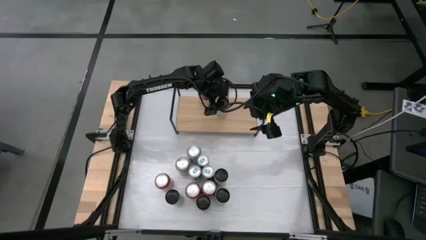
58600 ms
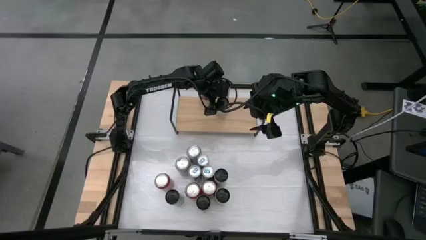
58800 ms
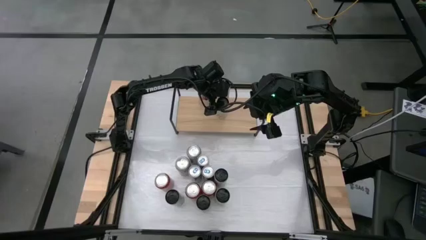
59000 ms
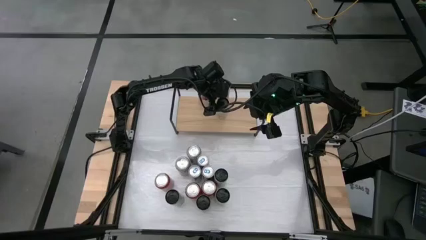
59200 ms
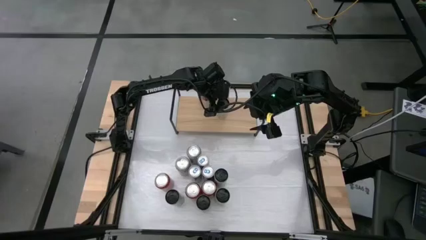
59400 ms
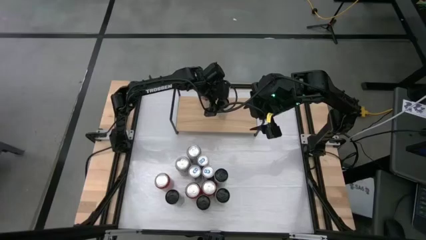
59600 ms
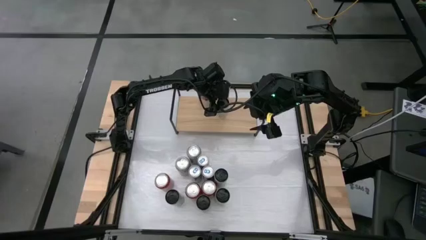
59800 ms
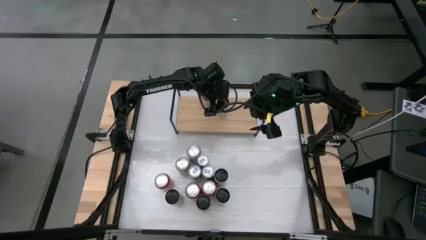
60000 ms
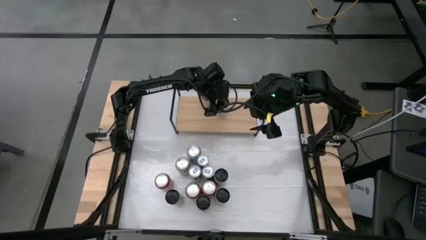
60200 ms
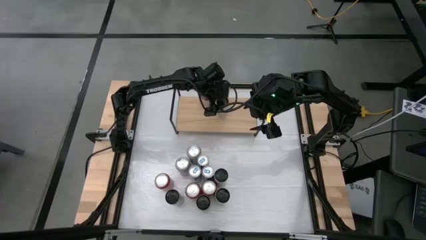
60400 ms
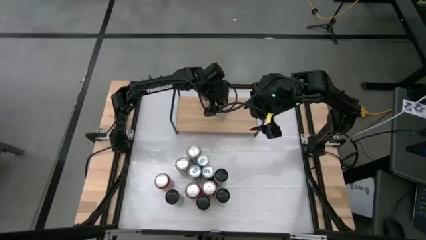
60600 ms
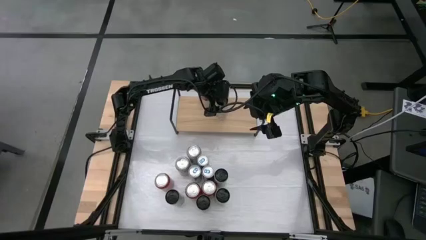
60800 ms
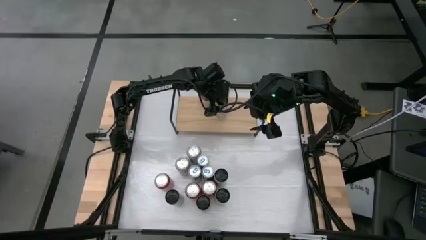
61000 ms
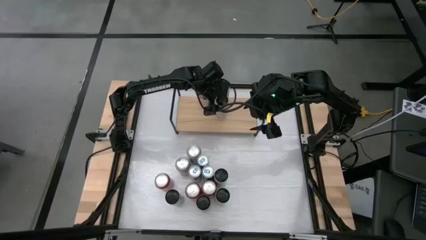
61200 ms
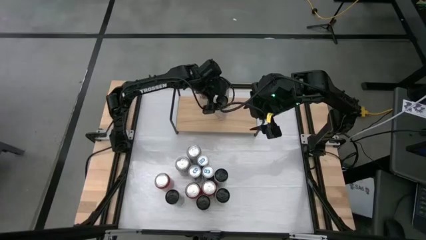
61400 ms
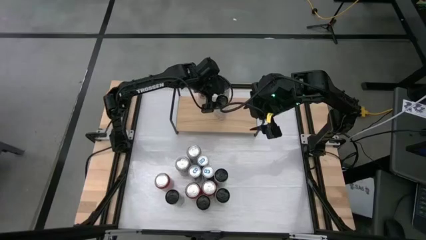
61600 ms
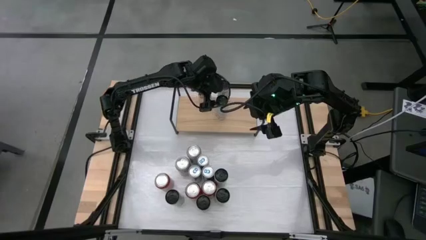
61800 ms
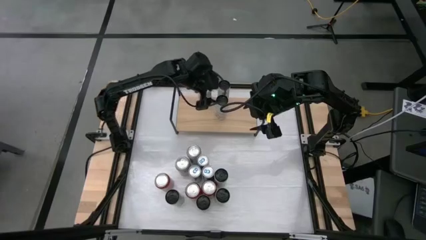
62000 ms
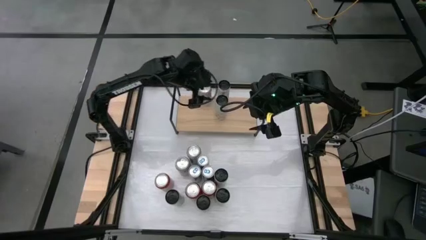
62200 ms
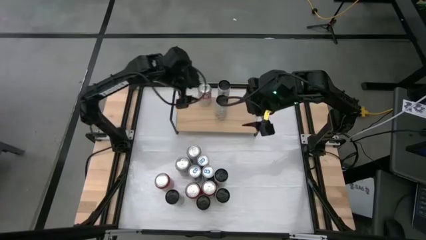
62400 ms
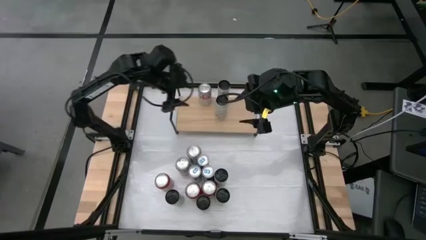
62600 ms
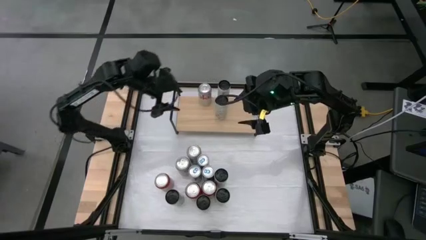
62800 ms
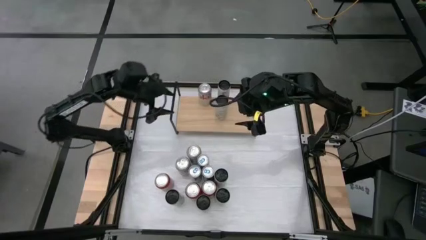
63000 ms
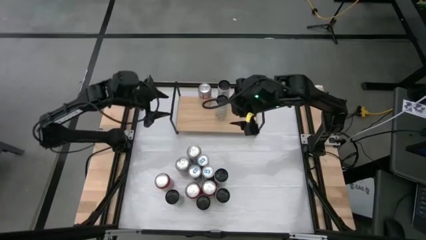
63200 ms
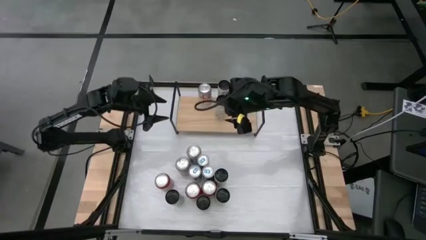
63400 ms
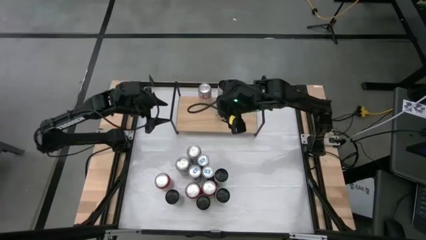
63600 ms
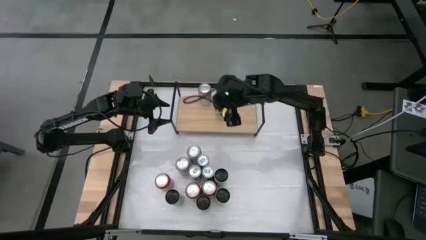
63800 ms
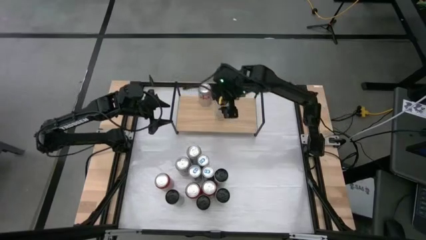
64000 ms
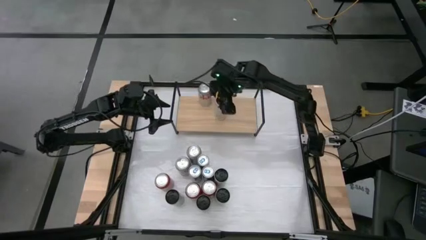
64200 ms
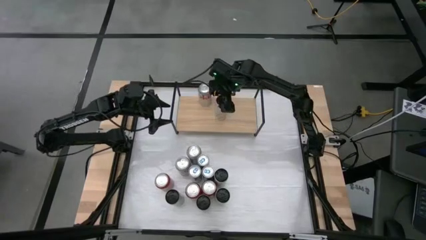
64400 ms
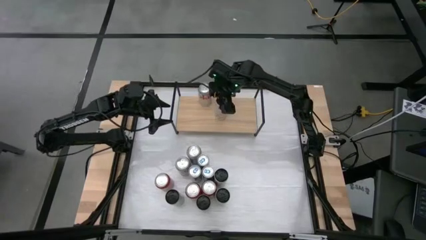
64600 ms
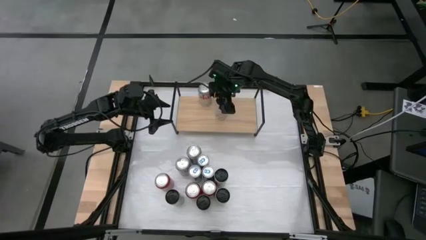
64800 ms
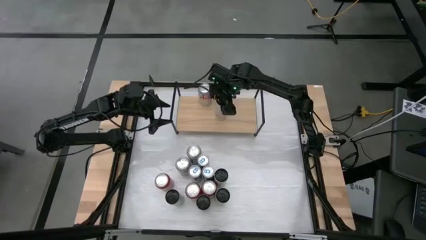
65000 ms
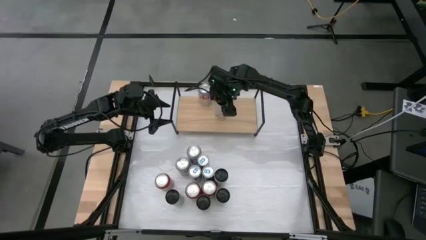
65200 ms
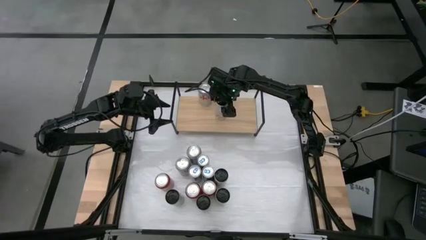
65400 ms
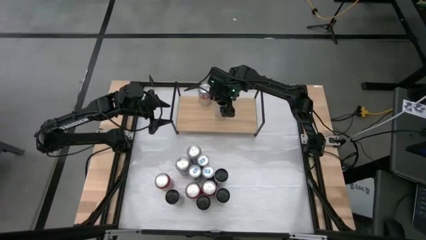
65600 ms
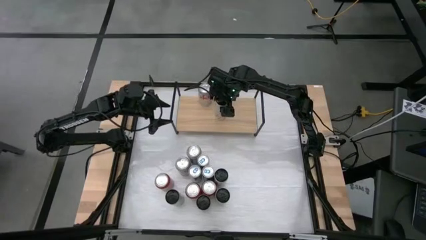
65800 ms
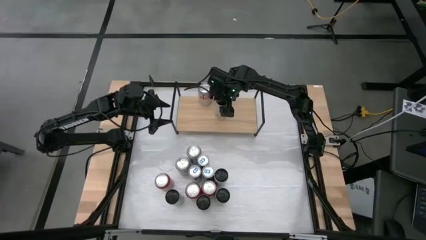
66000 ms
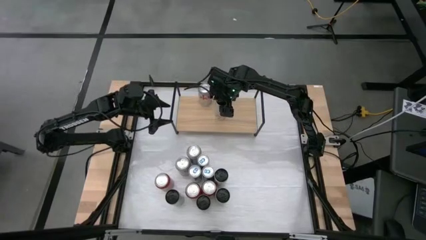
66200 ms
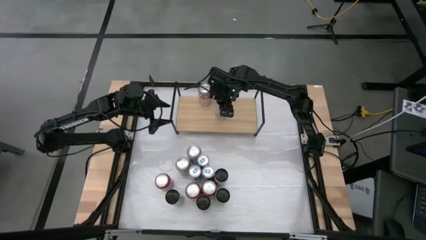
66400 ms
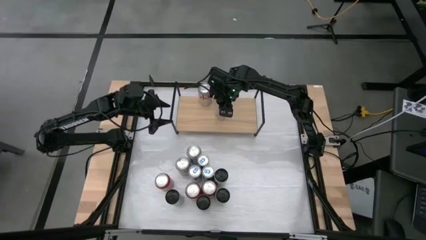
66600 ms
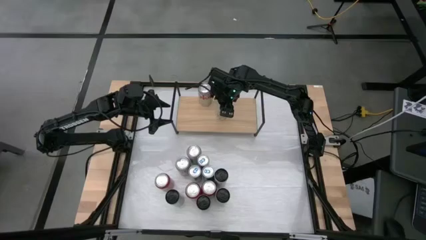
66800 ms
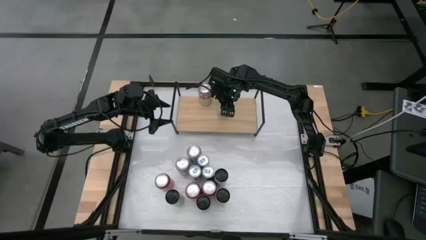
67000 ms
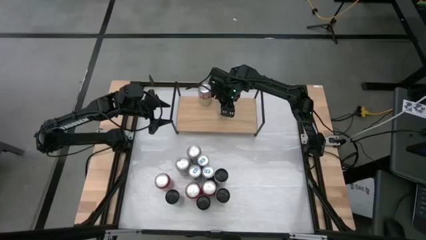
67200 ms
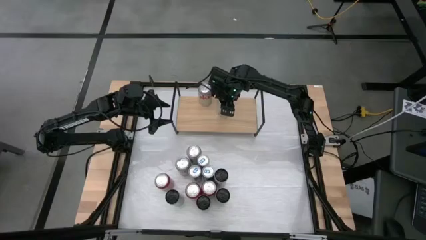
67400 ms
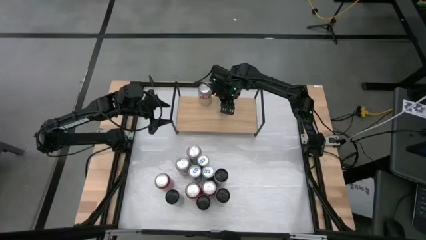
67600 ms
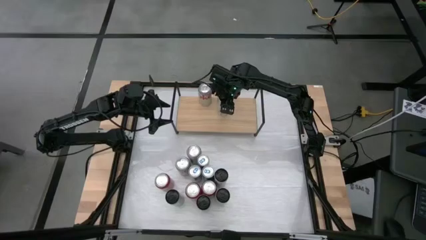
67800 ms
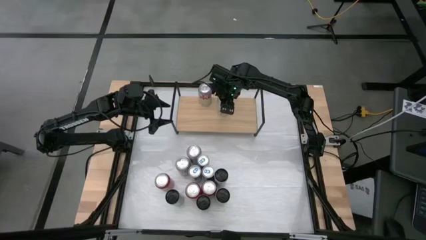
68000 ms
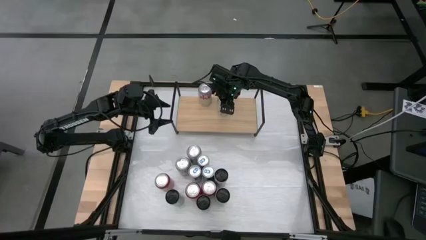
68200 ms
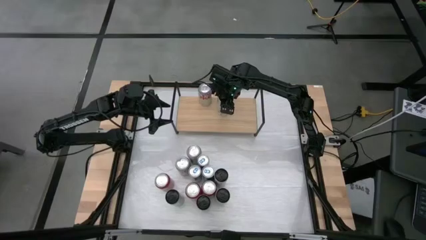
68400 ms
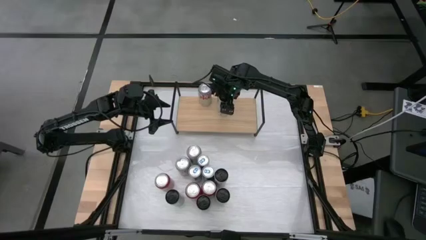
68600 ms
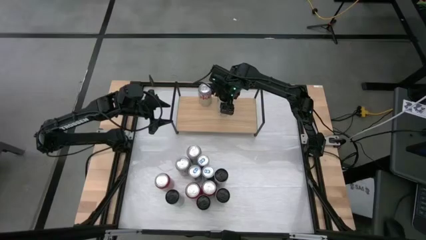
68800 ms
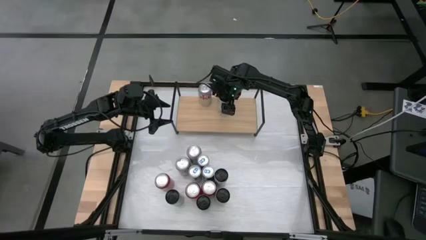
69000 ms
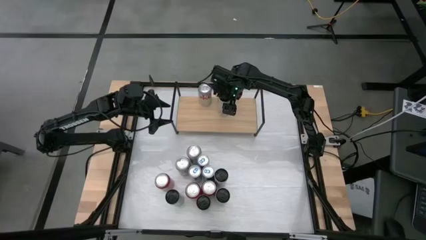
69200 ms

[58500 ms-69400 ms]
Task: Place canned beverage on shelf
Put the white yellow soda can onto the shelf aligned with the other white yellow soda can

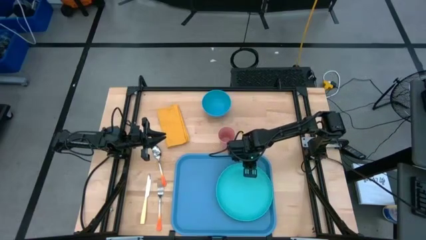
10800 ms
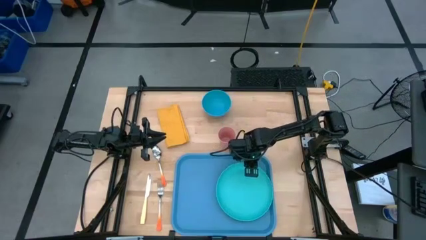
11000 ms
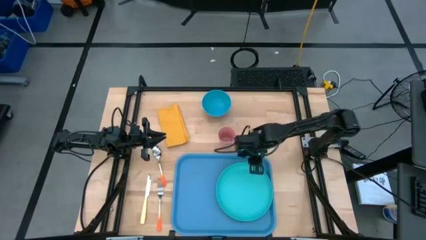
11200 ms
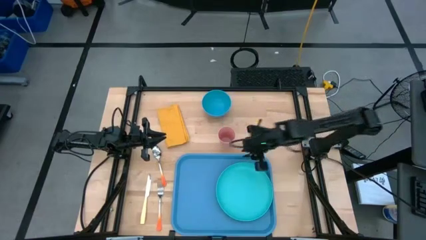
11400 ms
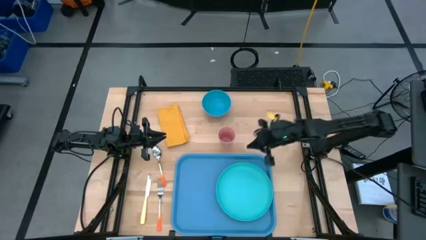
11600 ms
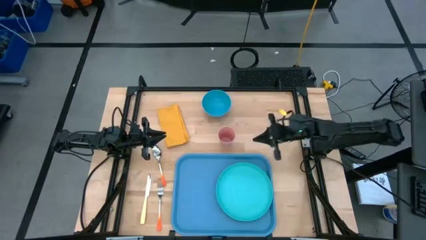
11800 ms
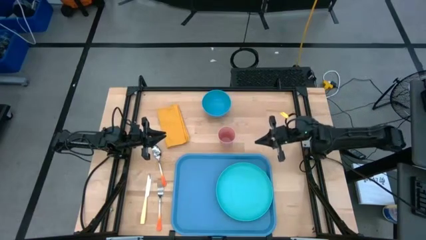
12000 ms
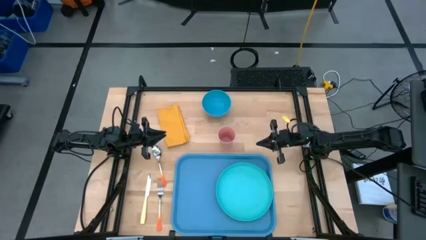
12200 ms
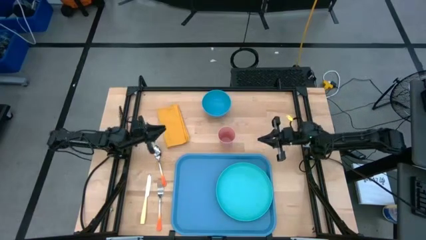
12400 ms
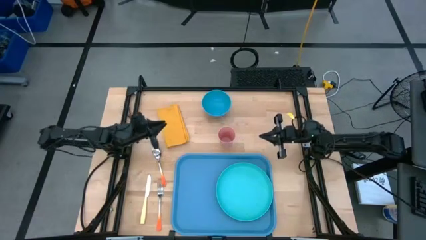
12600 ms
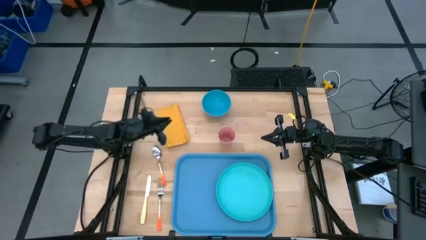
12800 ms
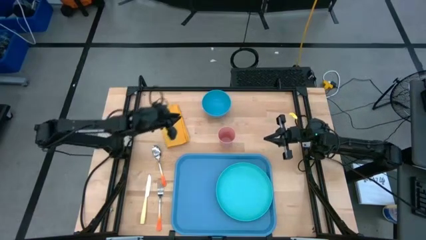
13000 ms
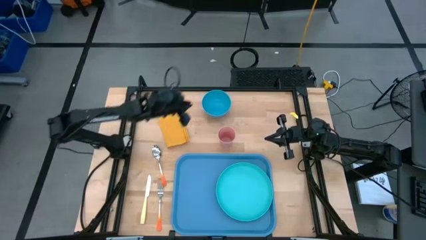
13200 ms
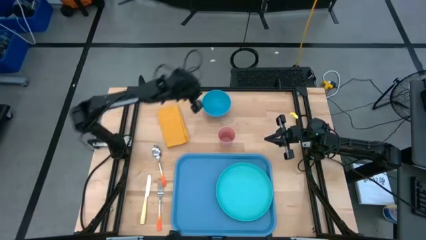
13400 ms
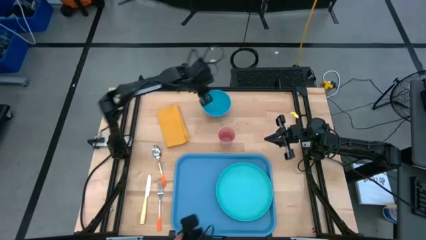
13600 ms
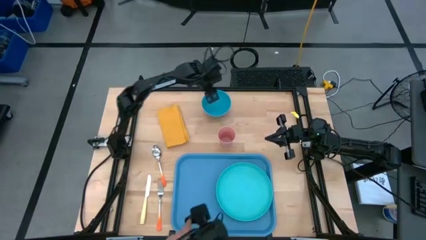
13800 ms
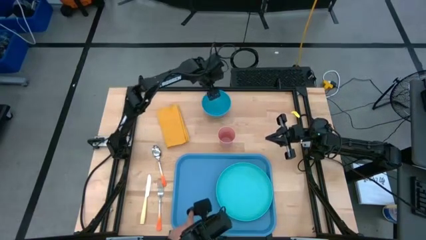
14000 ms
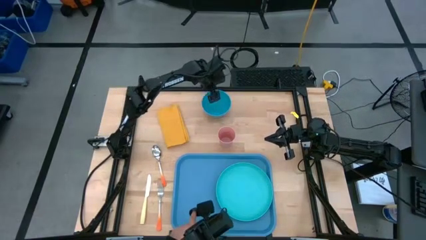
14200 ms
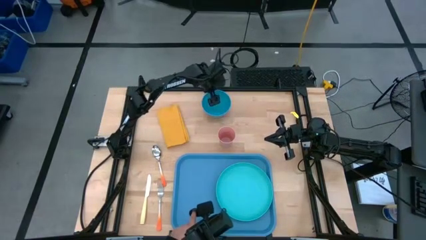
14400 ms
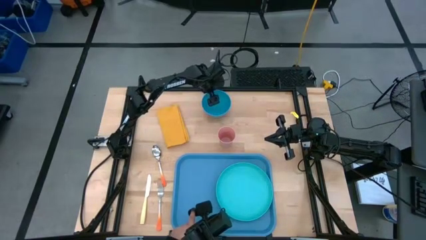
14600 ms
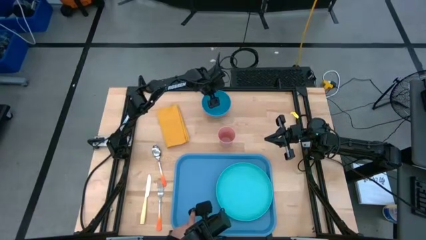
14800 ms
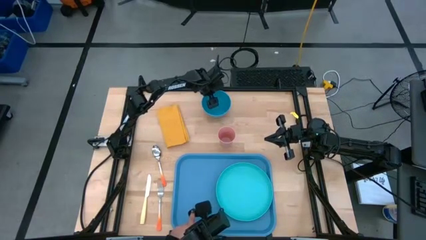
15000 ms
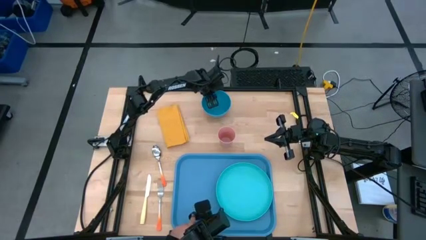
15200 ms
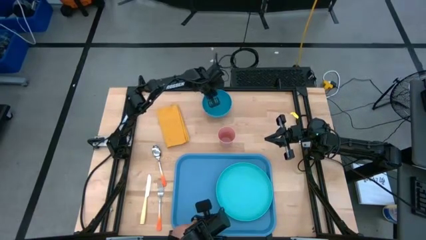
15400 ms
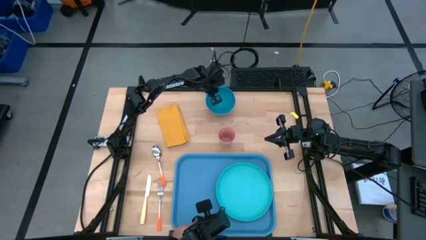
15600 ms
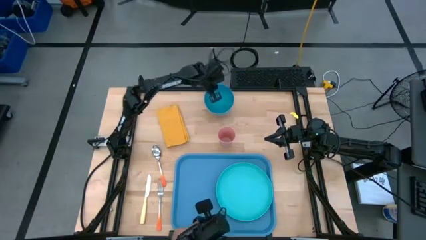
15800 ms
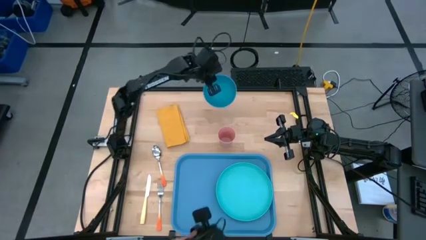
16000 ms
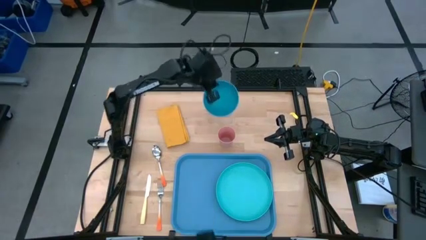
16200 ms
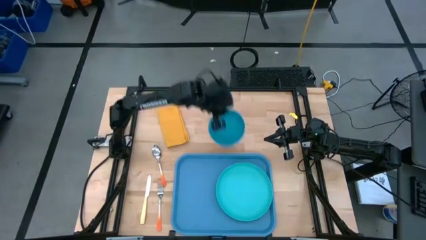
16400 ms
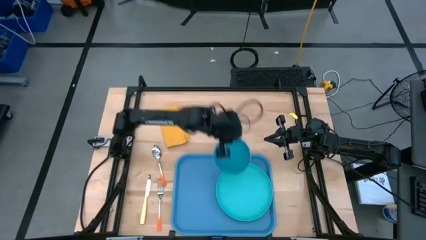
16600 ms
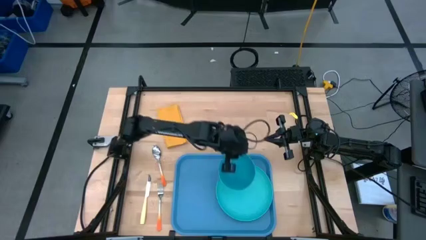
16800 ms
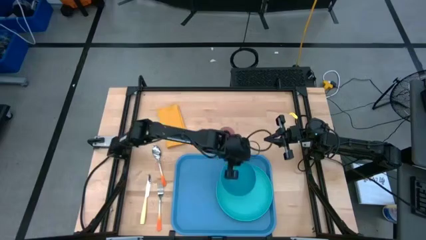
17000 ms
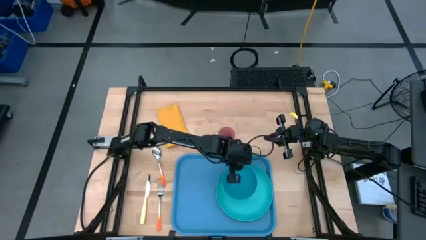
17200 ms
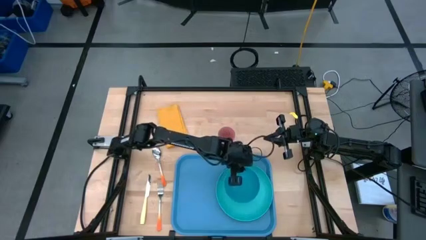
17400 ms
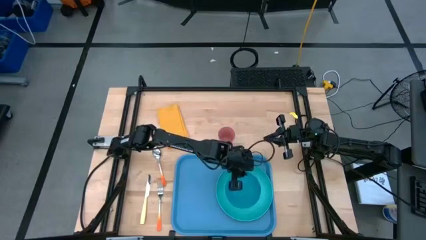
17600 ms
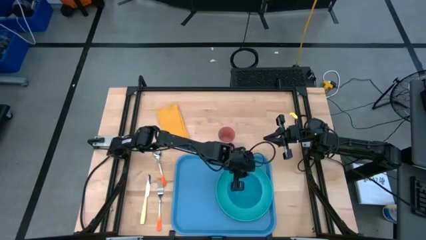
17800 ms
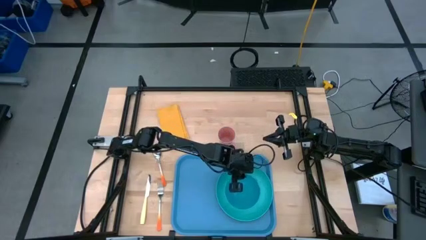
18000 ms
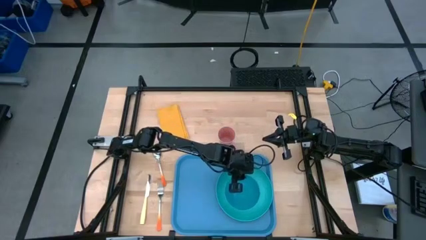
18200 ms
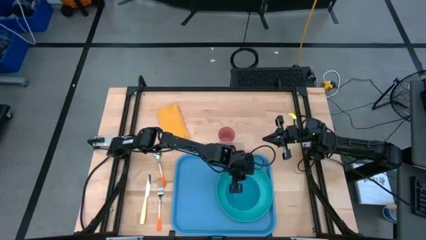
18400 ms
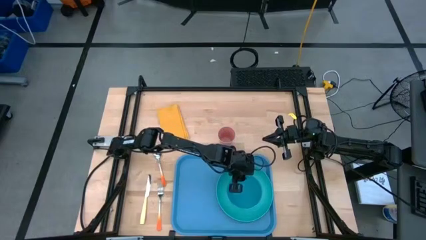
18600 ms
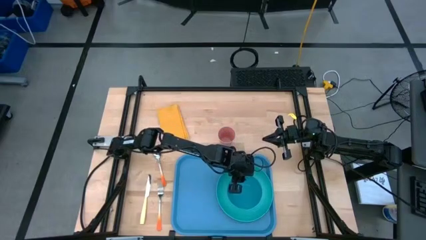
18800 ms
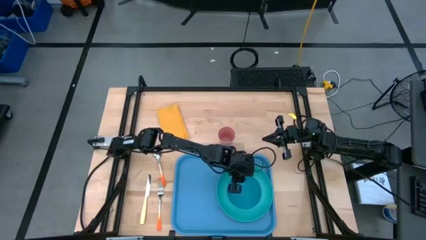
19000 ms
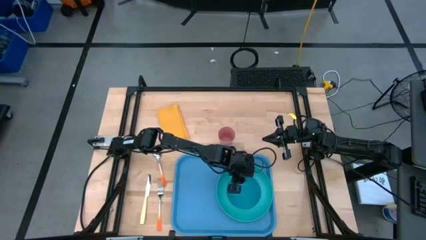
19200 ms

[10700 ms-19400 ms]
Task: Set up tray
Put the blue bowl on the top of the blue plate
